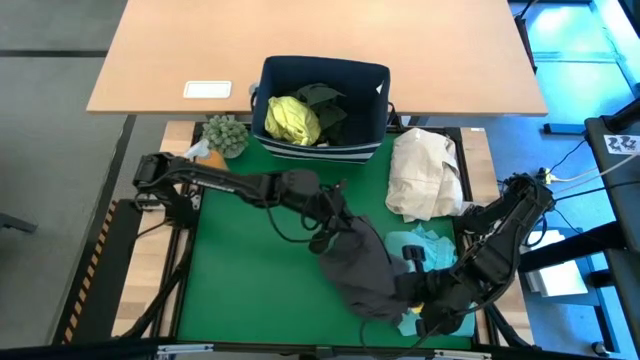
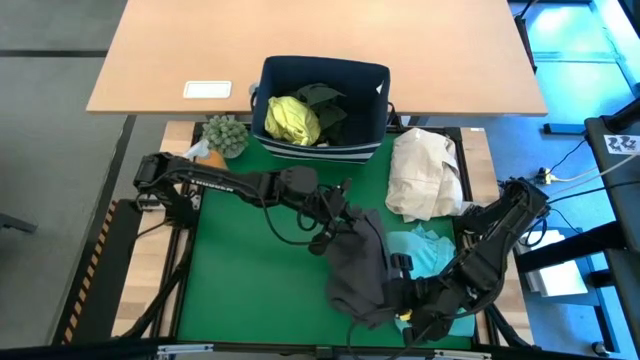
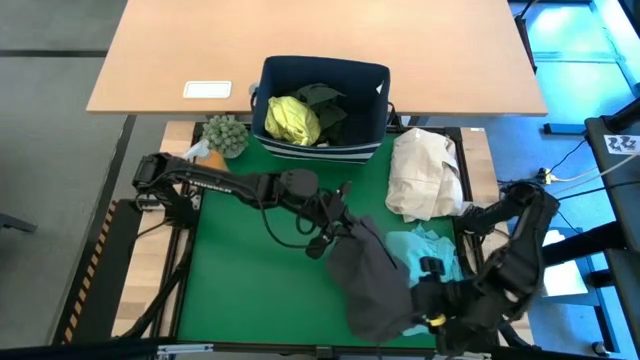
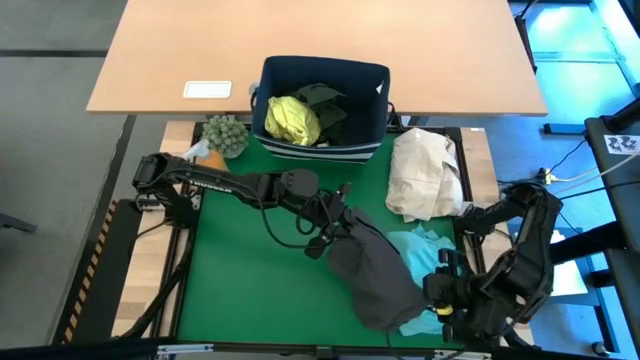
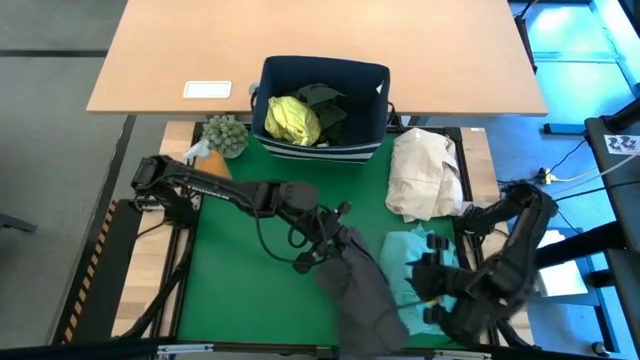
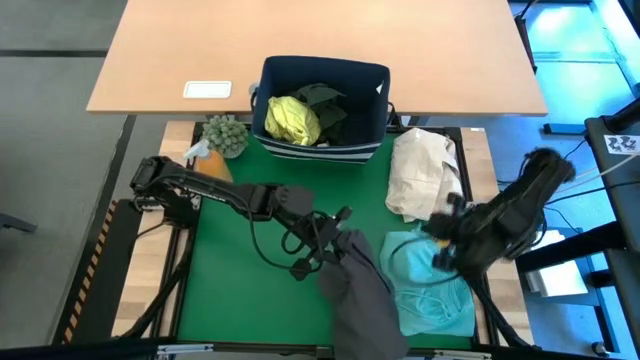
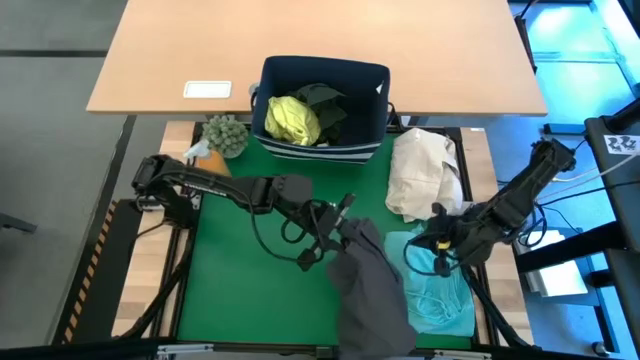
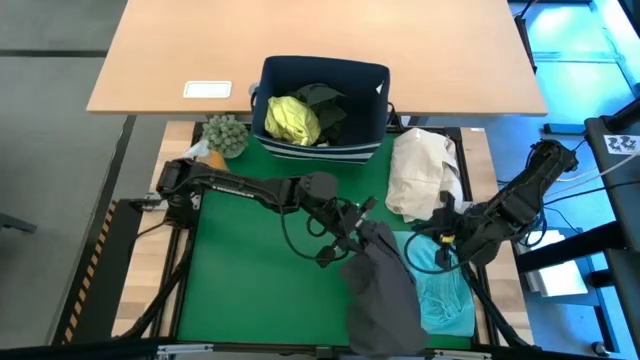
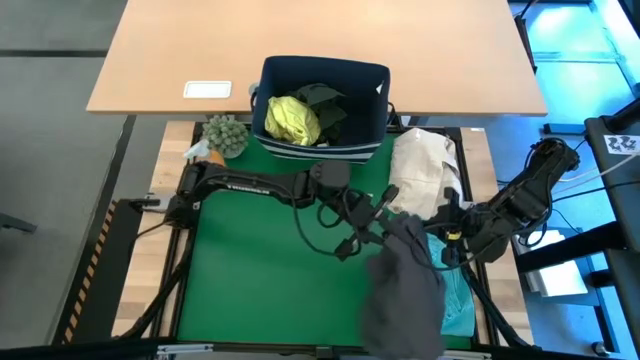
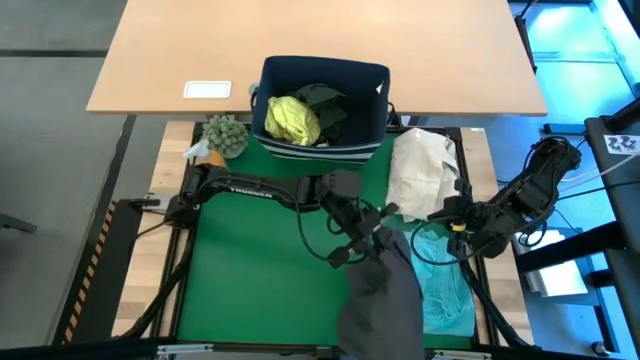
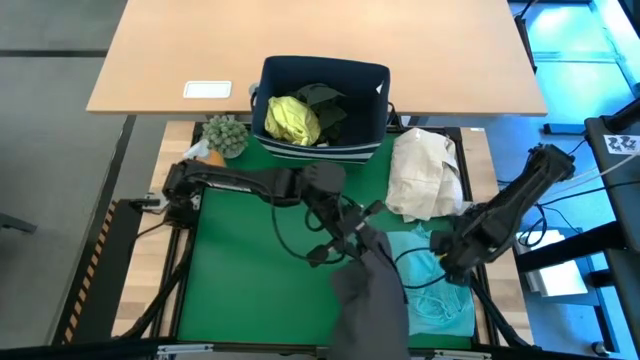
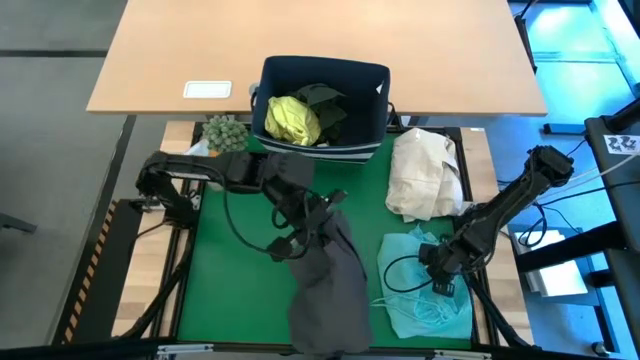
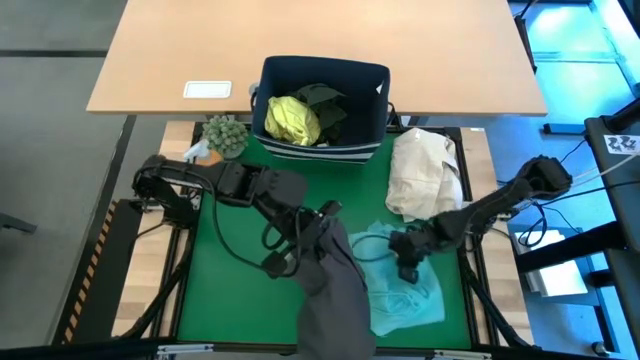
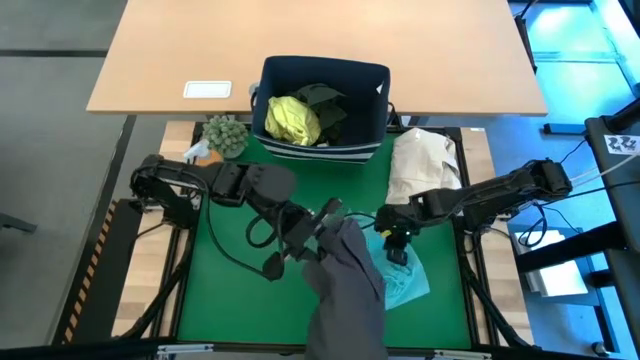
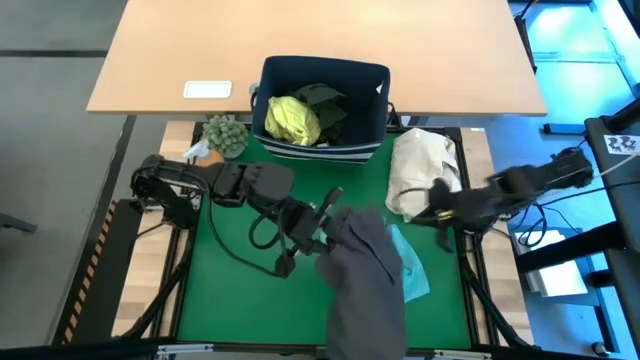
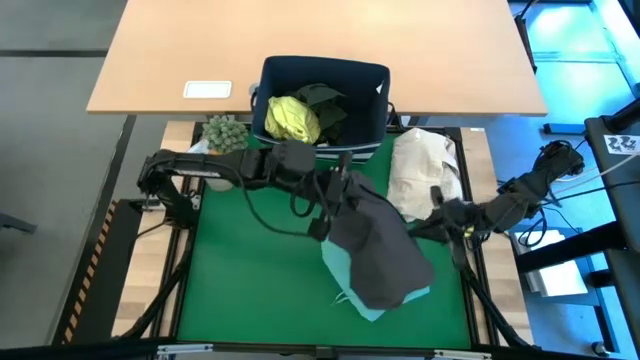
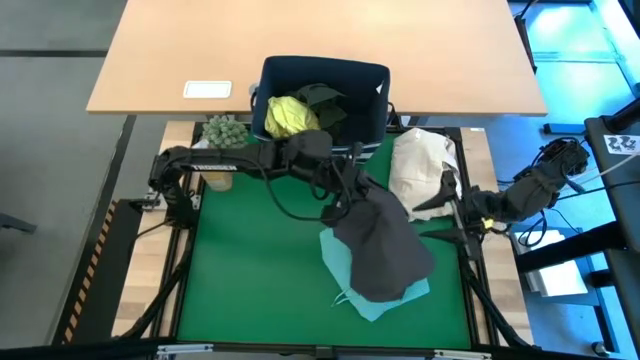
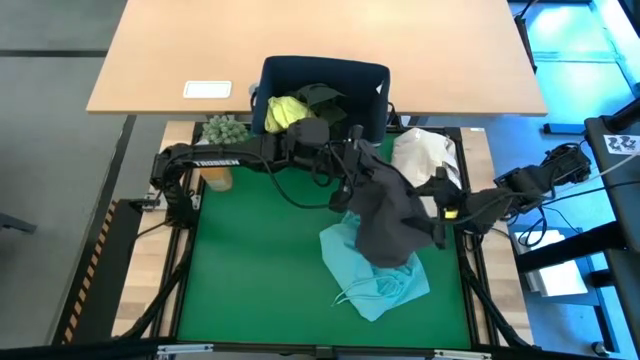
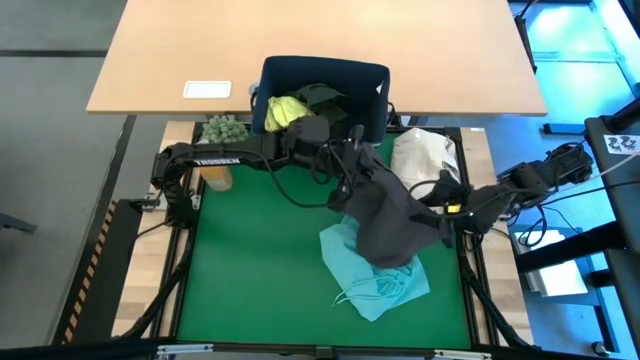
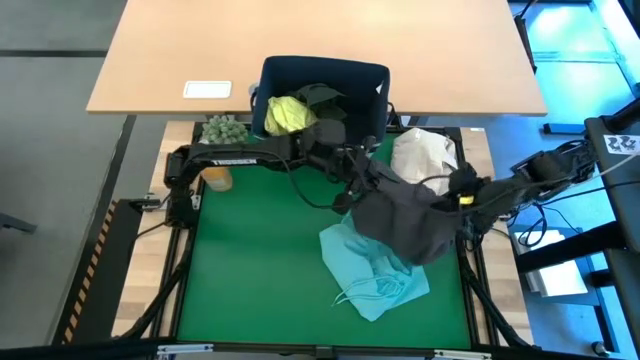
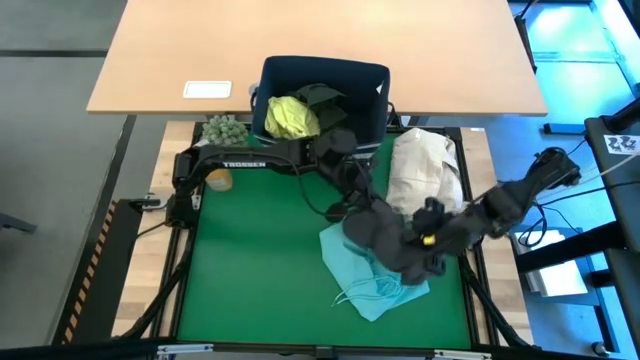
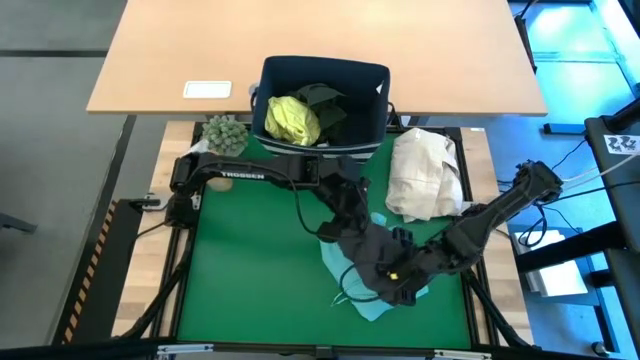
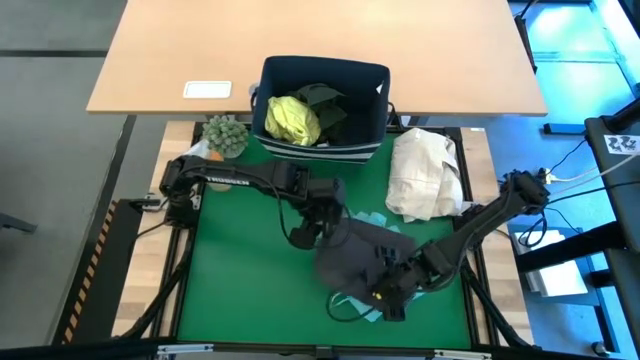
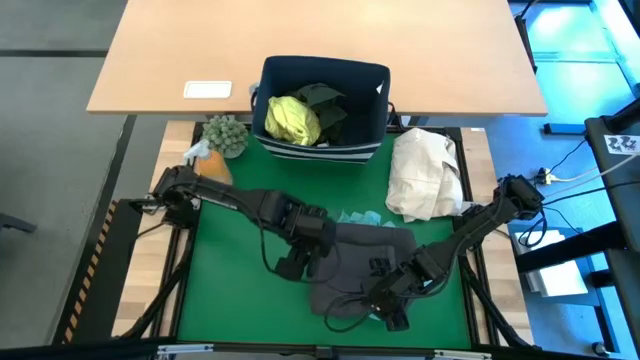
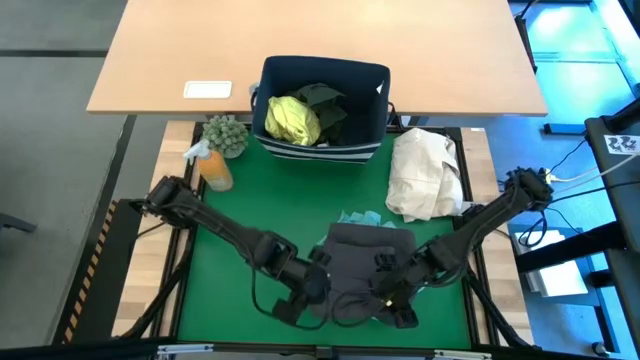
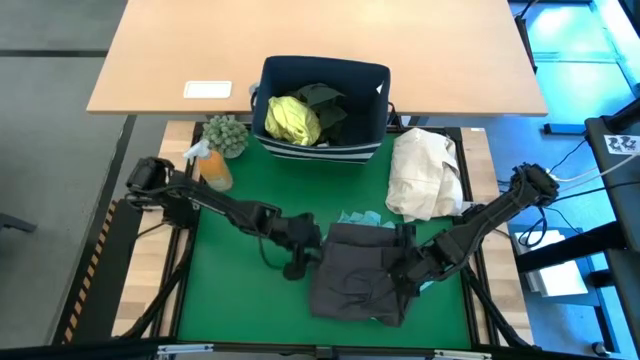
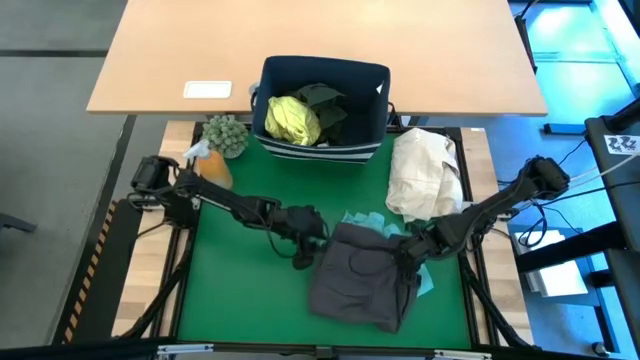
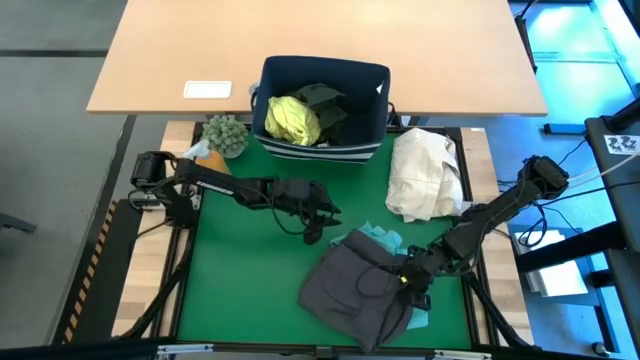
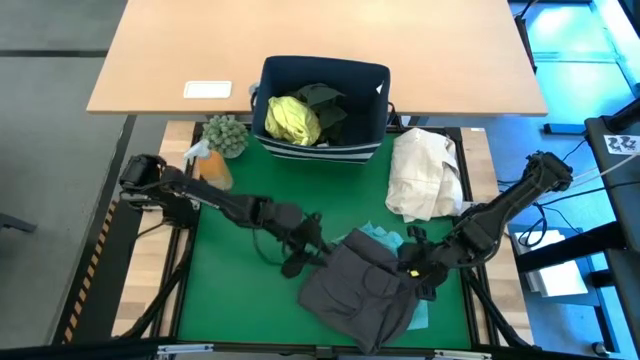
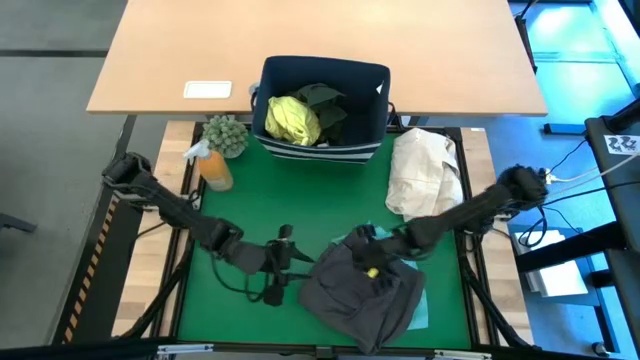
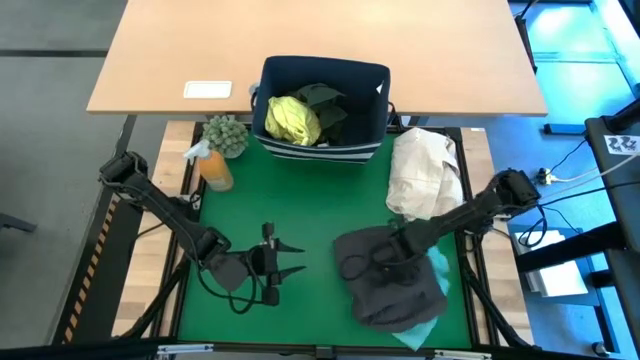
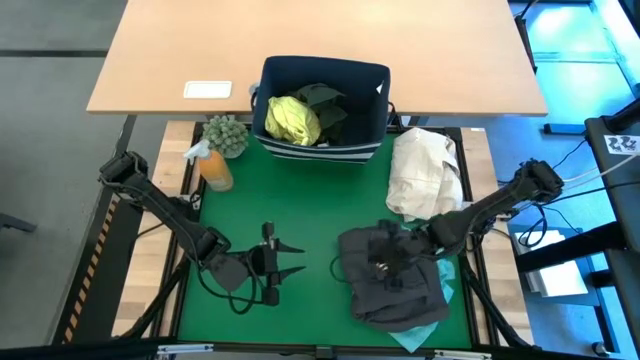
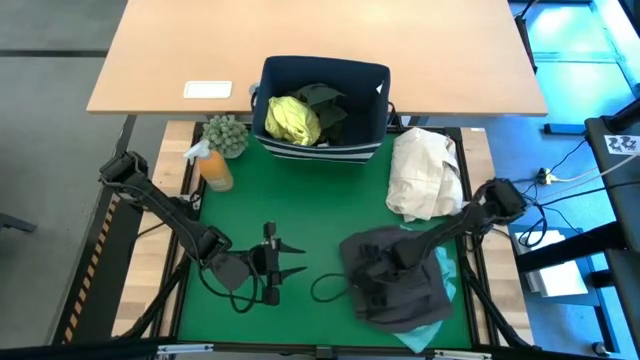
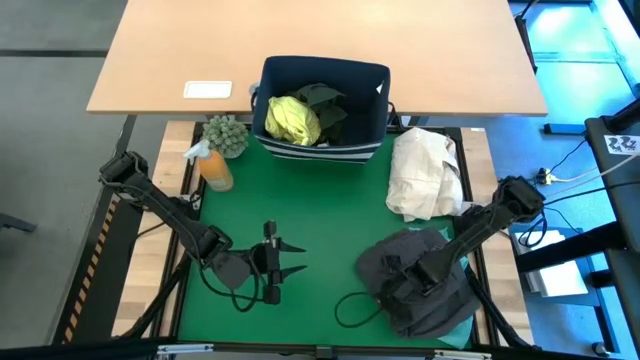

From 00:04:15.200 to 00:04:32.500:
Task: Fold laundry
Stack the black shorts on the blue shorts
